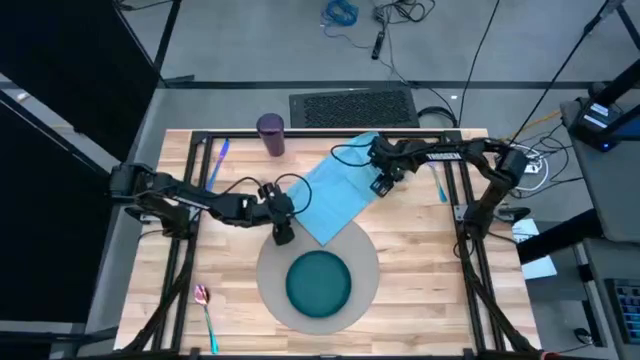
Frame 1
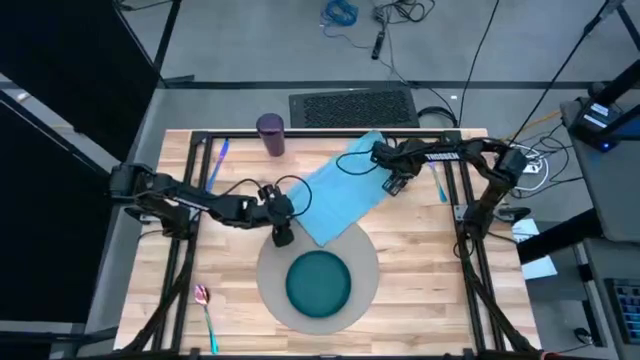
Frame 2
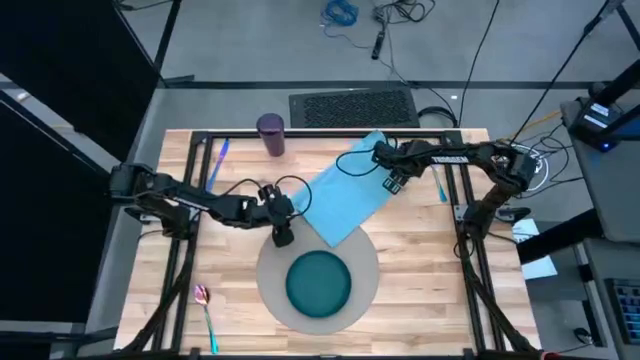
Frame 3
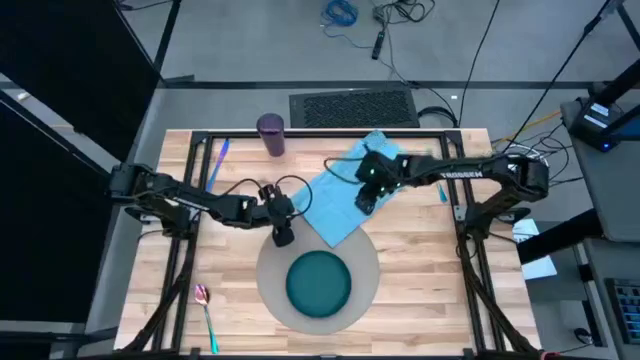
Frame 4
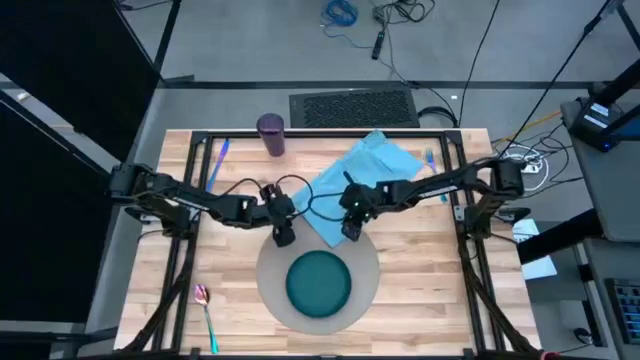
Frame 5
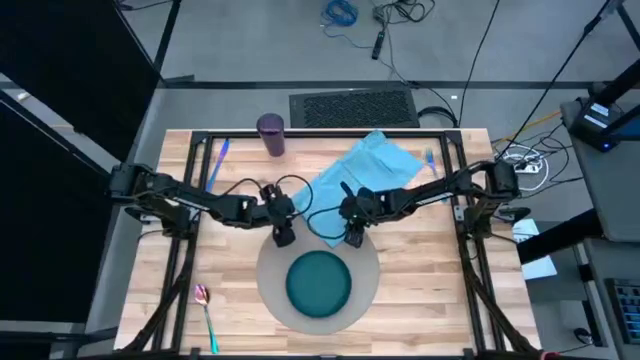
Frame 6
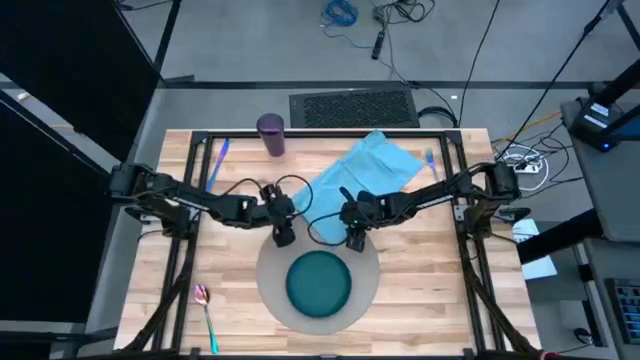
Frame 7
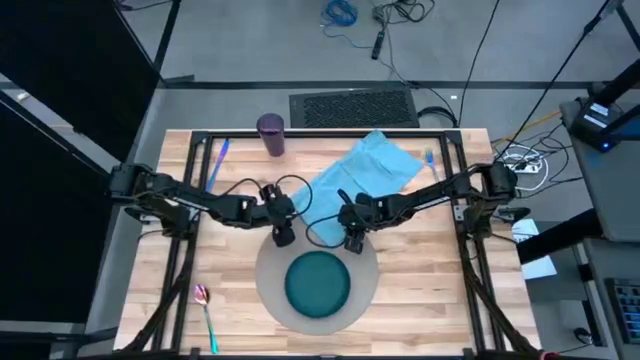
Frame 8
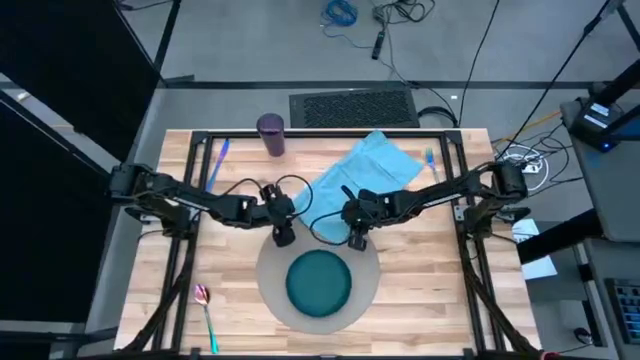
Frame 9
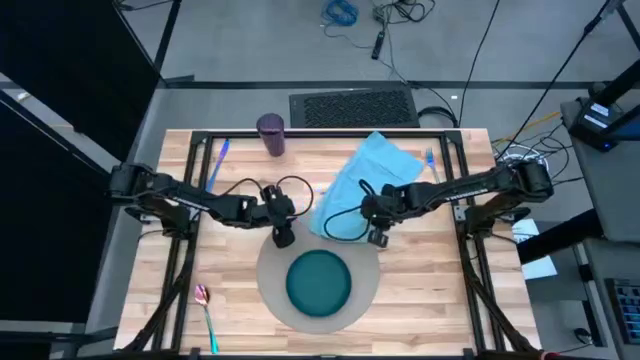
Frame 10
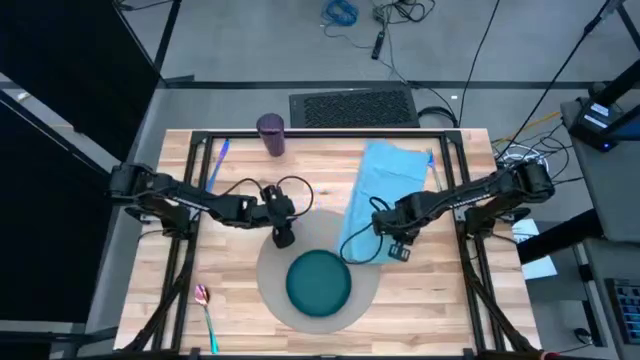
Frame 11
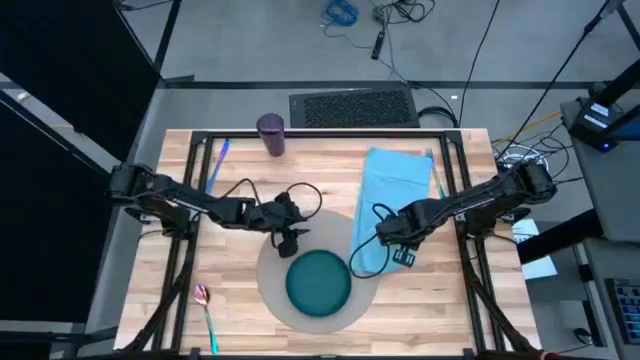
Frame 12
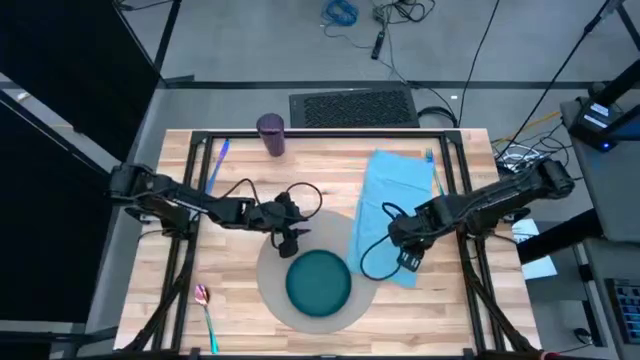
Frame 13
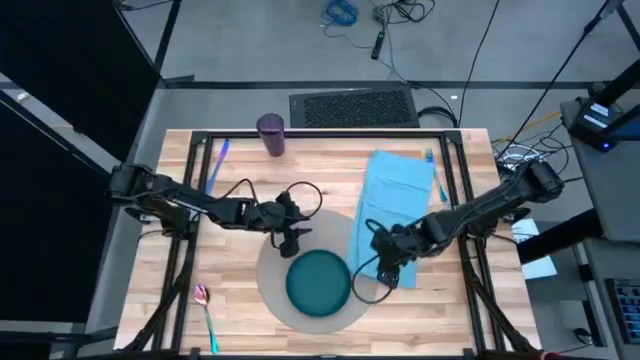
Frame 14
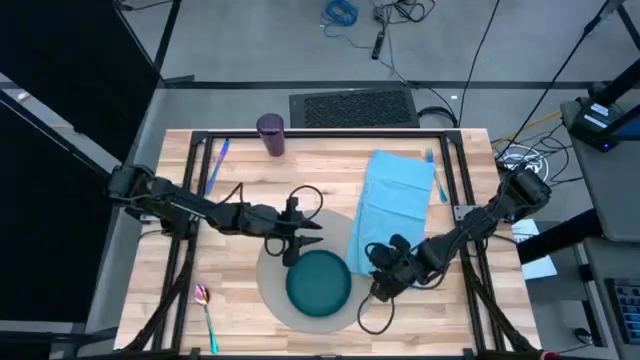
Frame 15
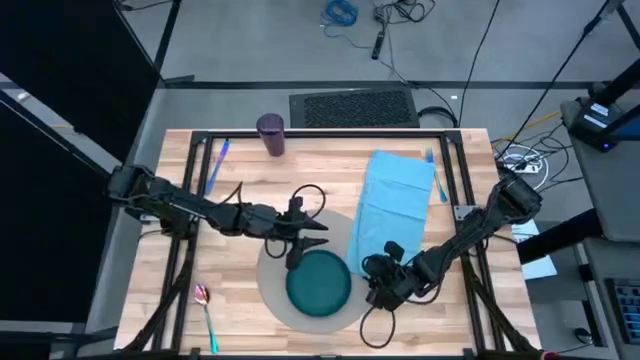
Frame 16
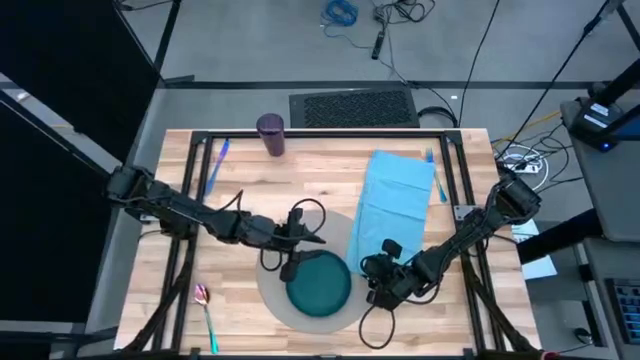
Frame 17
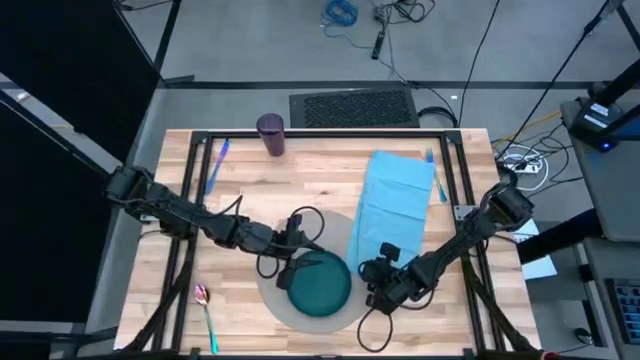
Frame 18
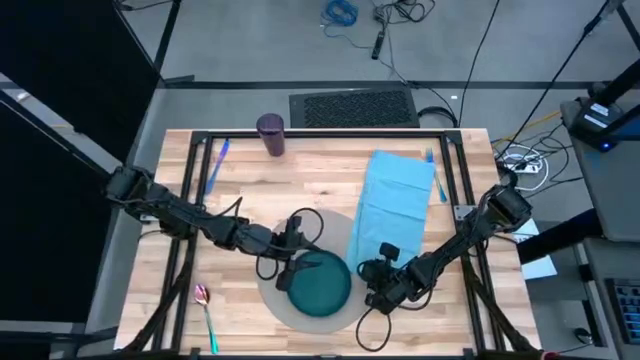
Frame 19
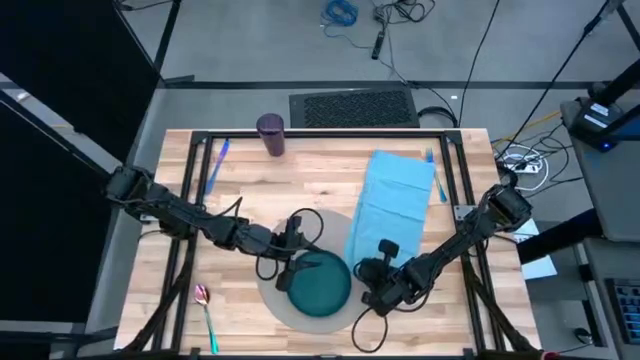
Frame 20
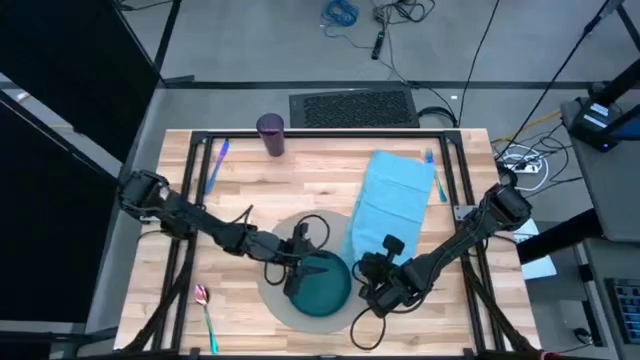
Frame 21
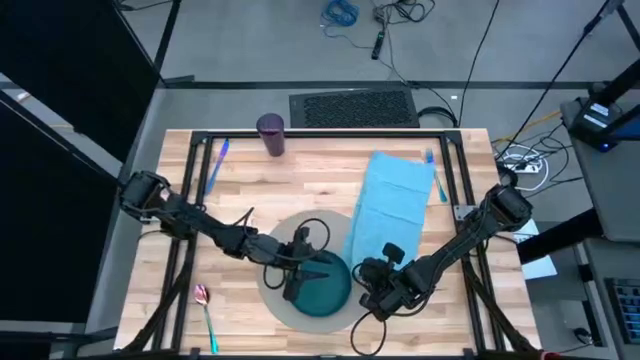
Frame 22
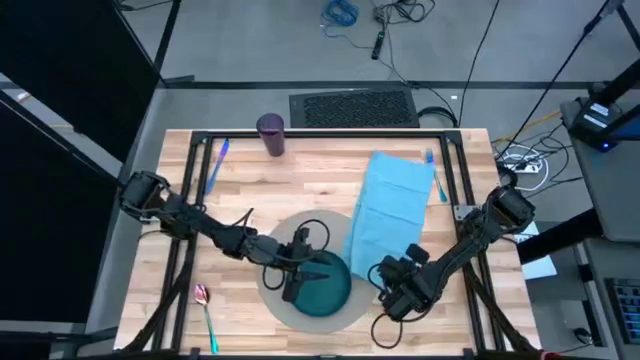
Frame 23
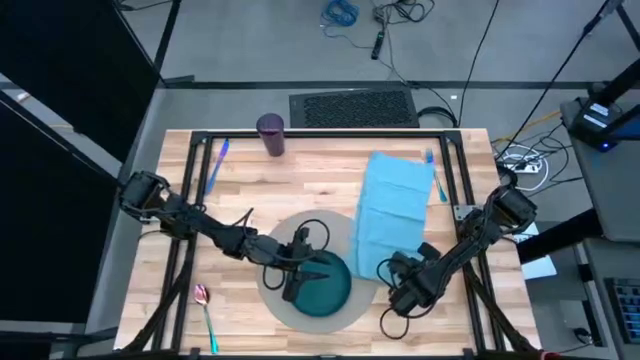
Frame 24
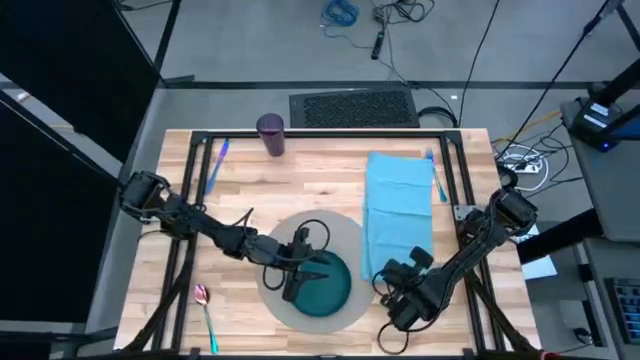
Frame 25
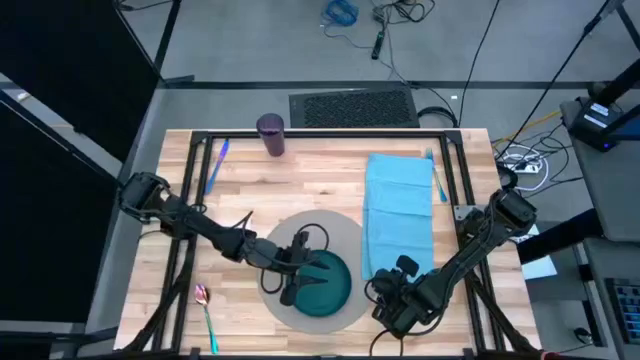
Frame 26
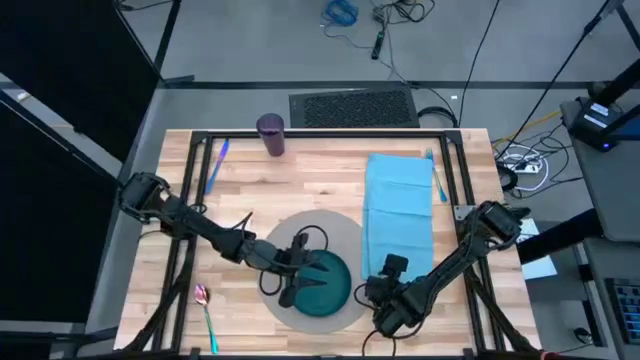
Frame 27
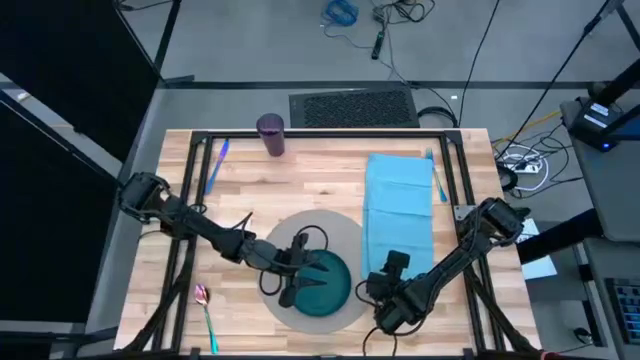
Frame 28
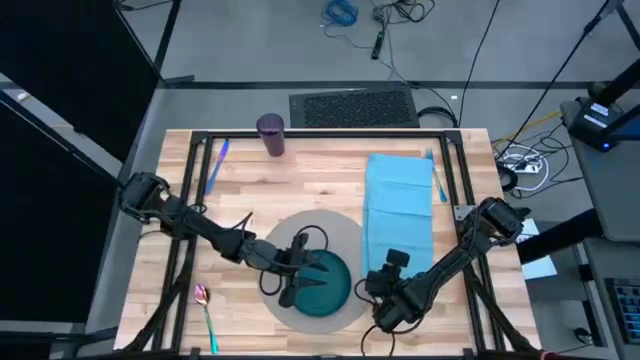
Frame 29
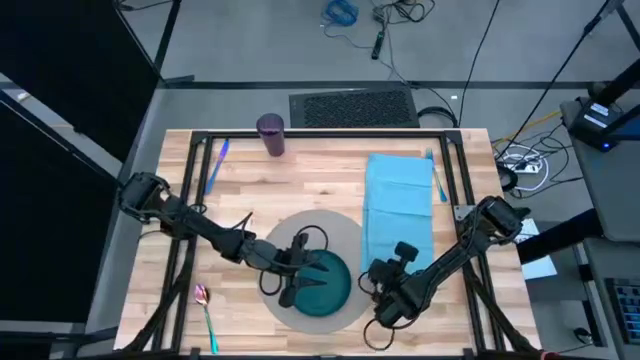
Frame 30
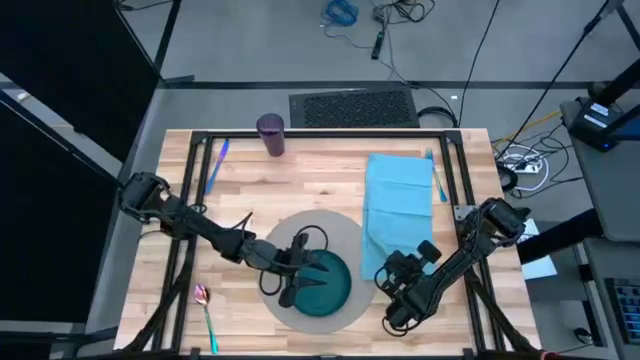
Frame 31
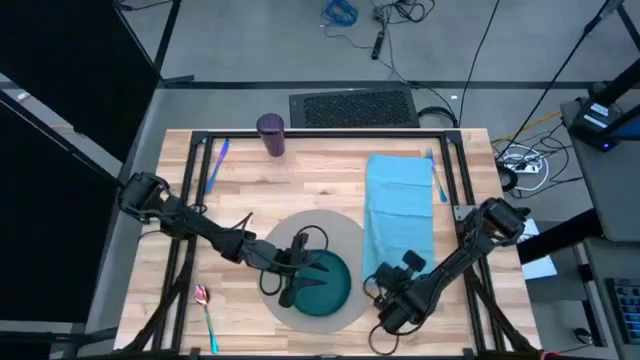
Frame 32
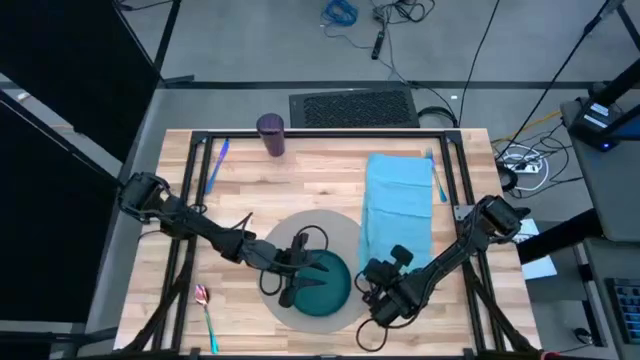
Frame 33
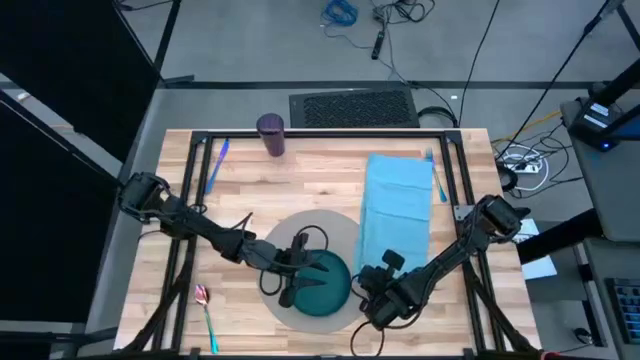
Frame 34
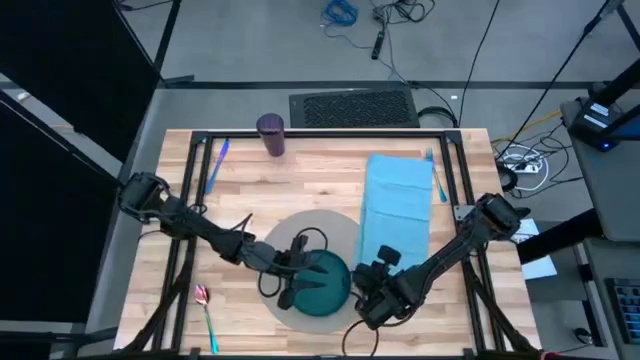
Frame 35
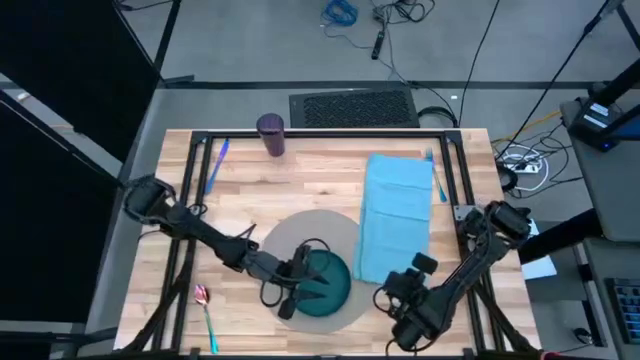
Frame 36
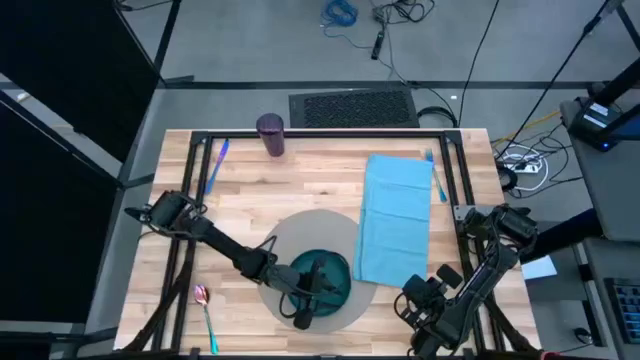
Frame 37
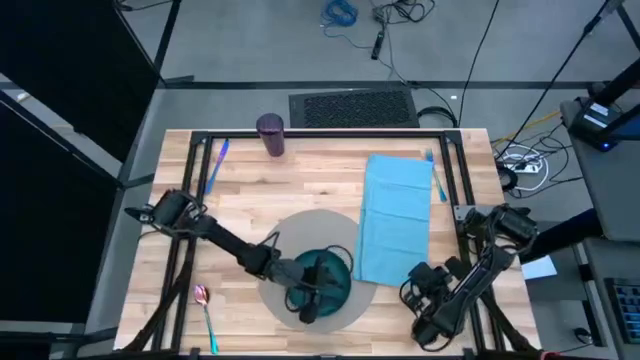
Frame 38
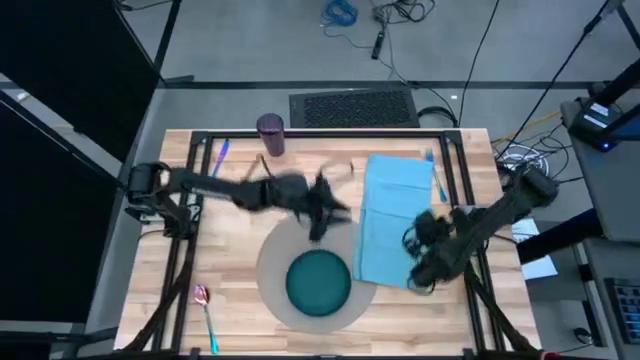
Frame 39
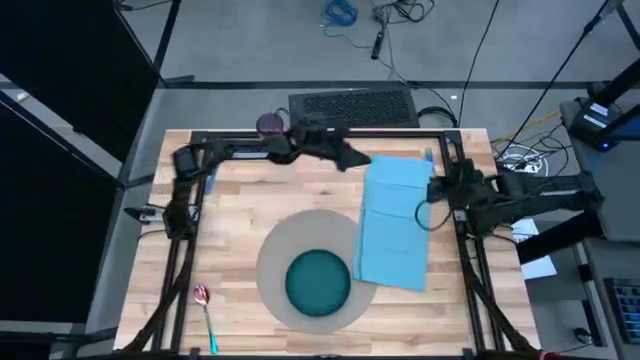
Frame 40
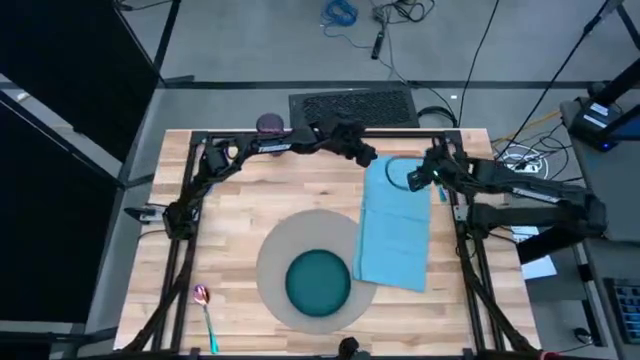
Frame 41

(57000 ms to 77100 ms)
Task: Set table place
Fold the blue table napkin

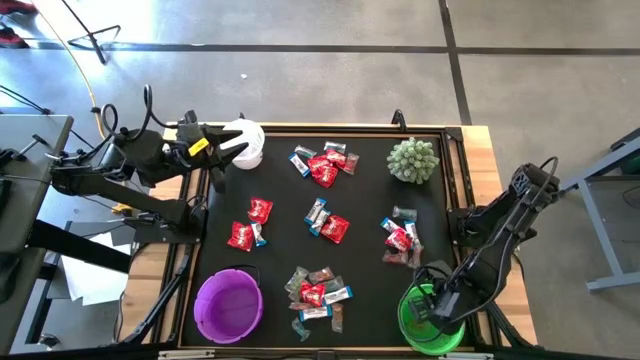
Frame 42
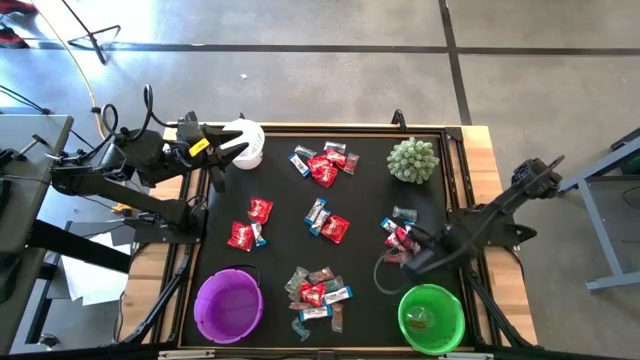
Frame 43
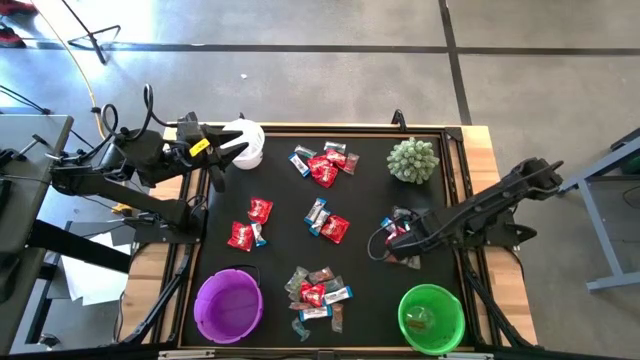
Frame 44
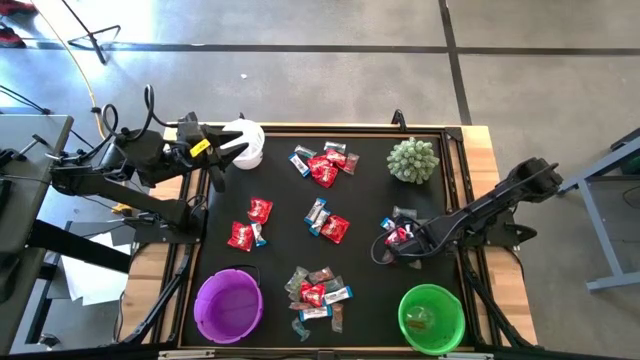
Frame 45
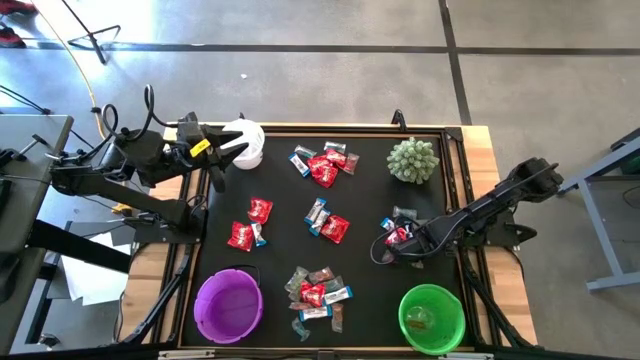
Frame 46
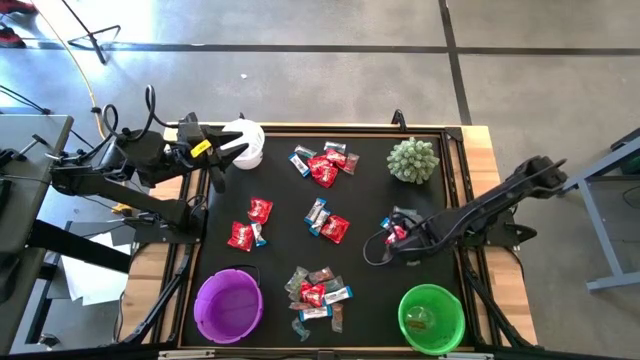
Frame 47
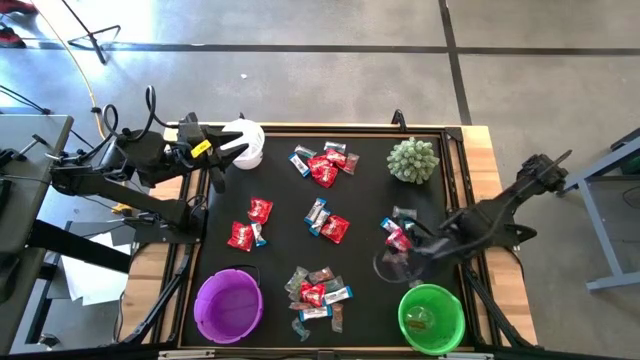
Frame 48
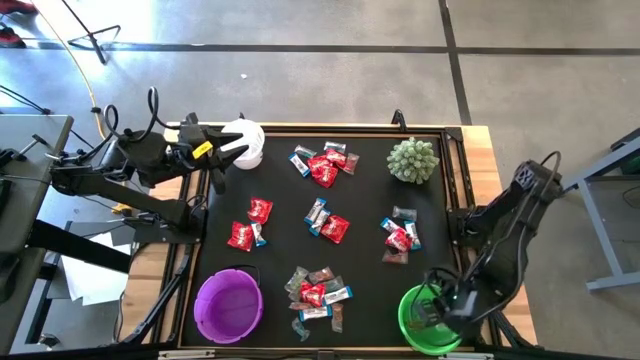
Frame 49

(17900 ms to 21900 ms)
Task: Sort candy
Put the orange gummy into the green bucket
